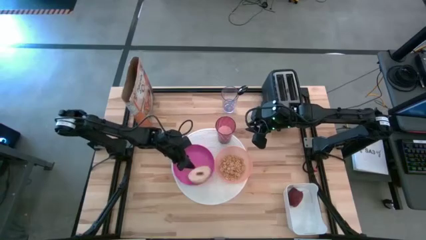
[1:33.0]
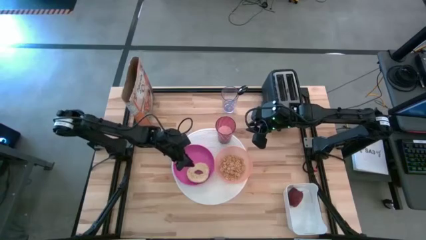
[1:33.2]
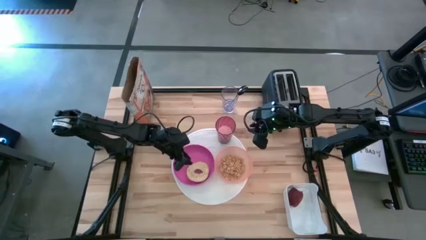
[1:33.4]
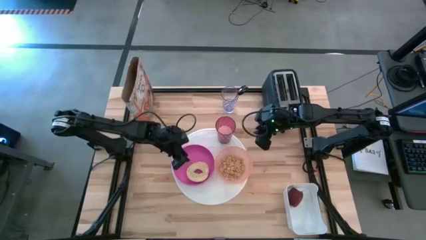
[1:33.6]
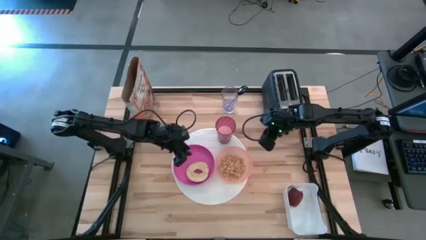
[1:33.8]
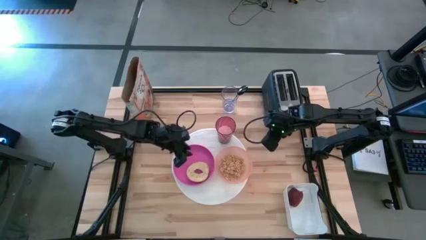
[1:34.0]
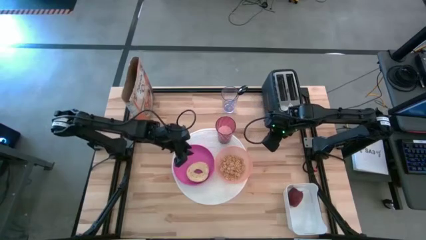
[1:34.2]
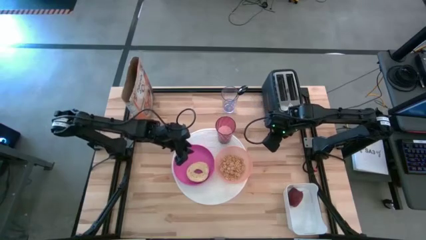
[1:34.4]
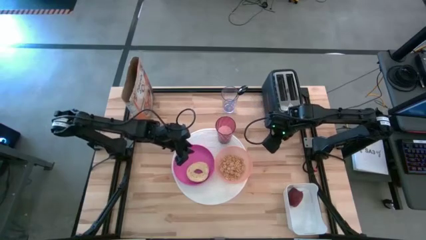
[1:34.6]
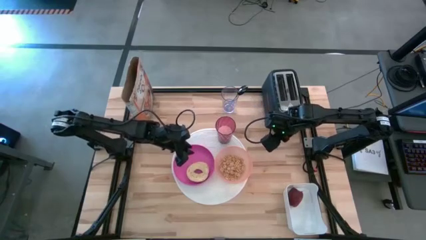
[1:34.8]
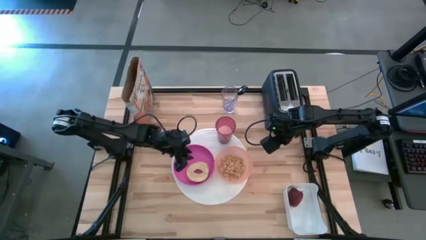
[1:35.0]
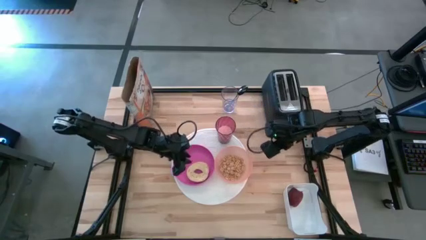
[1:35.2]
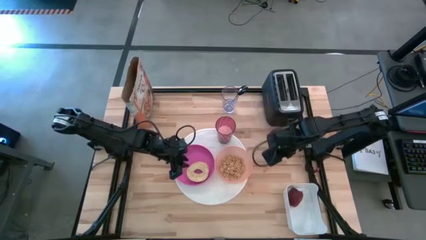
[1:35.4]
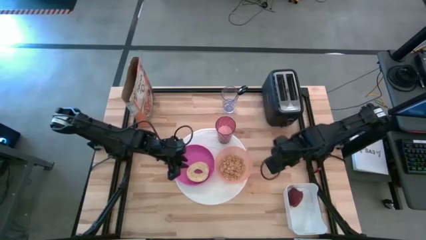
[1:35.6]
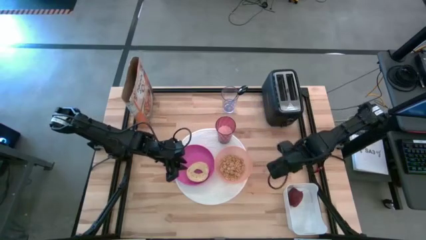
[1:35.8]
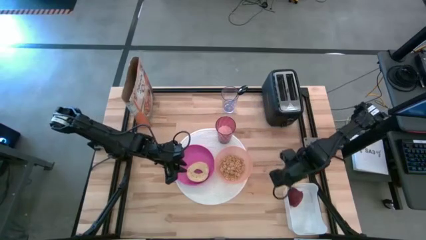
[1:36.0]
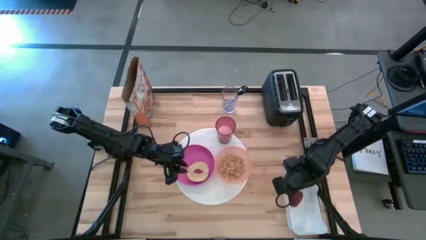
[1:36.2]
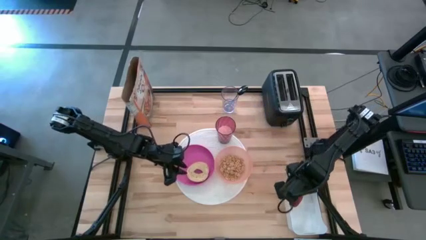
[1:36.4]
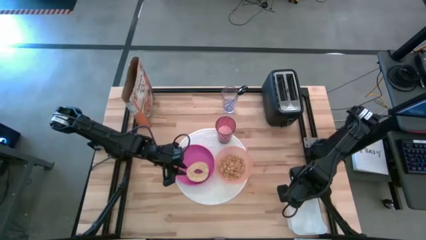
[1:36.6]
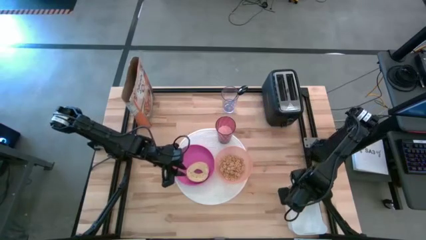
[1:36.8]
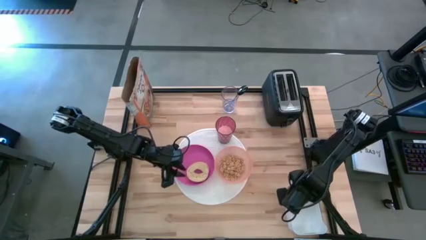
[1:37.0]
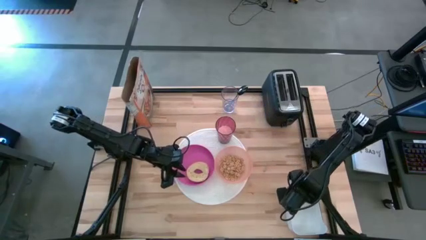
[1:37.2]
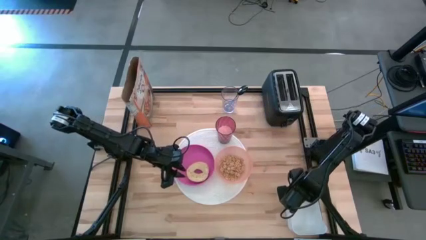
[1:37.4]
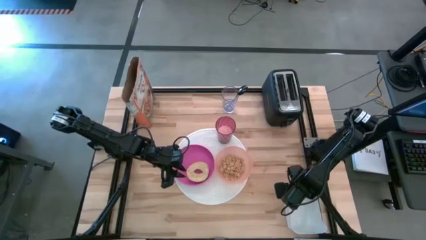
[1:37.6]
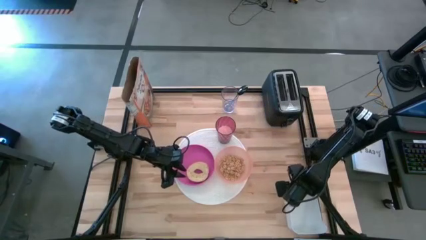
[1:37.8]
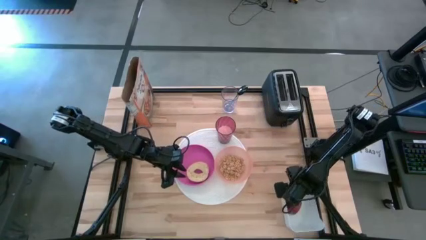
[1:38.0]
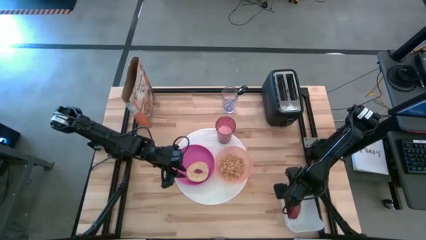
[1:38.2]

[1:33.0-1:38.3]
Task: Arrange a breakfast setting
Put the apple from the white bin to the top of the pink plate on the white mat

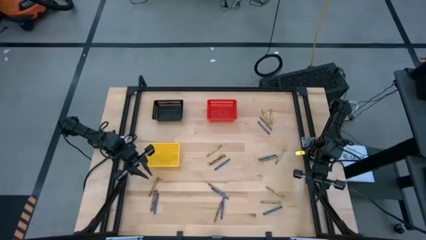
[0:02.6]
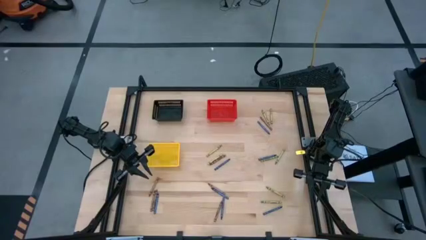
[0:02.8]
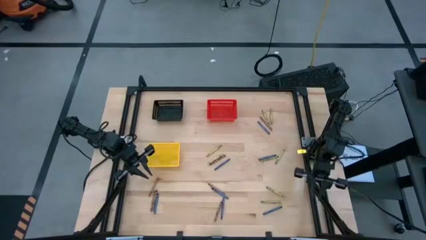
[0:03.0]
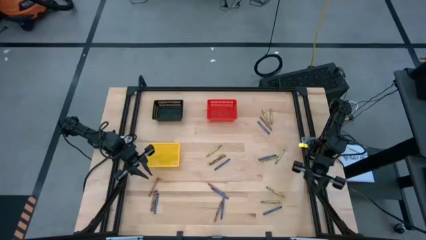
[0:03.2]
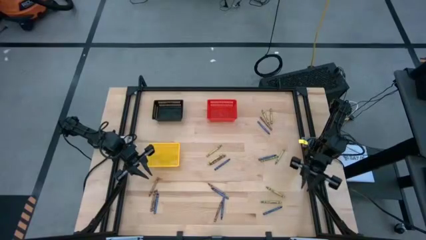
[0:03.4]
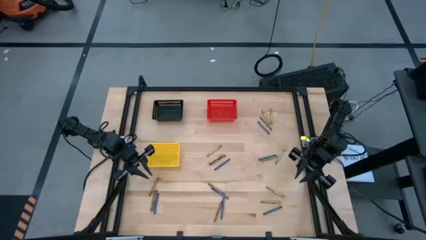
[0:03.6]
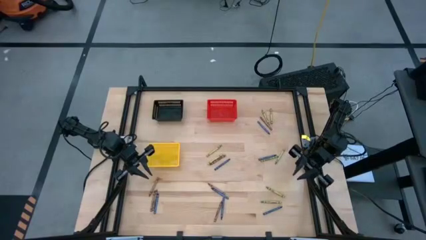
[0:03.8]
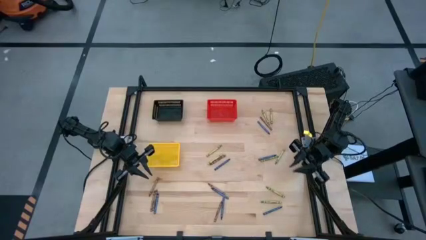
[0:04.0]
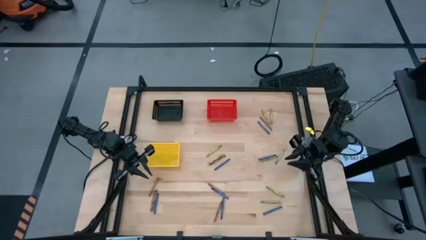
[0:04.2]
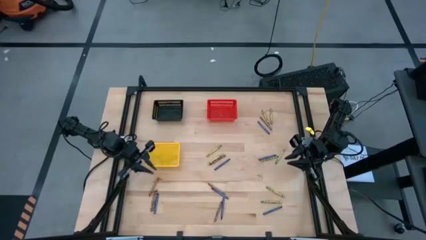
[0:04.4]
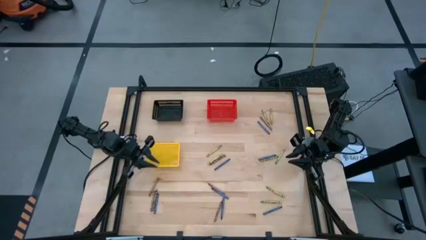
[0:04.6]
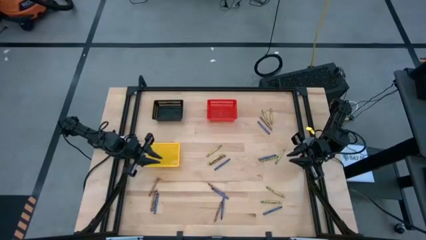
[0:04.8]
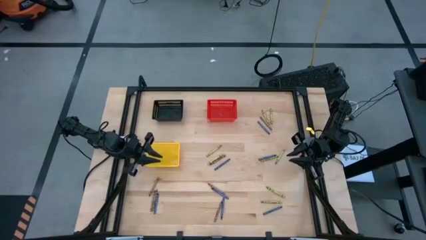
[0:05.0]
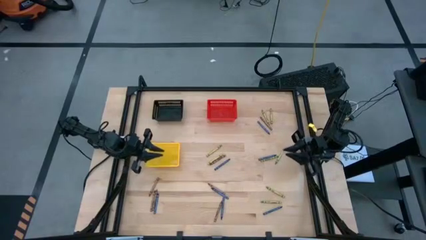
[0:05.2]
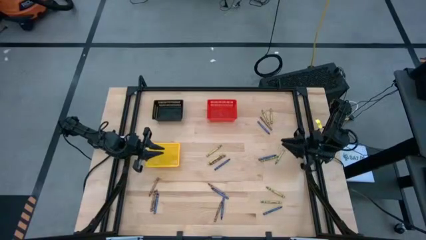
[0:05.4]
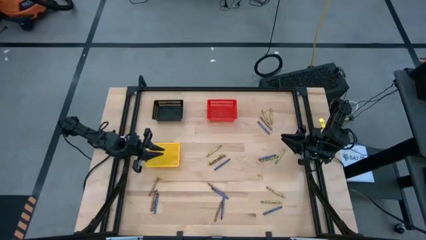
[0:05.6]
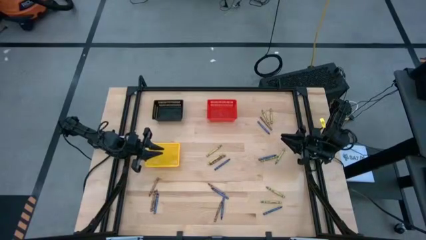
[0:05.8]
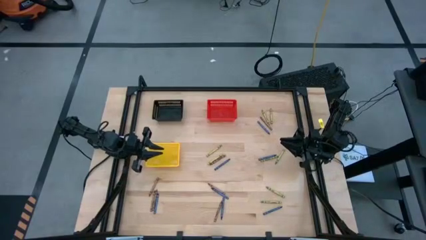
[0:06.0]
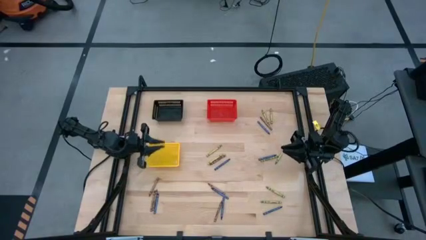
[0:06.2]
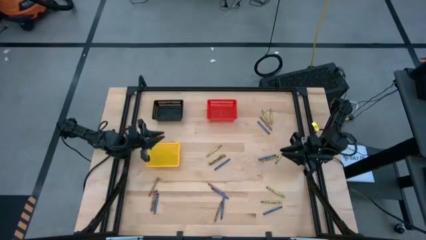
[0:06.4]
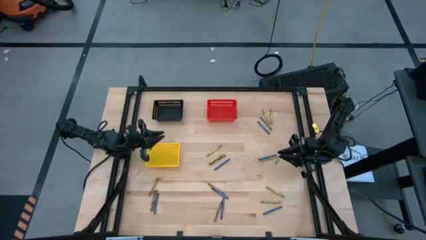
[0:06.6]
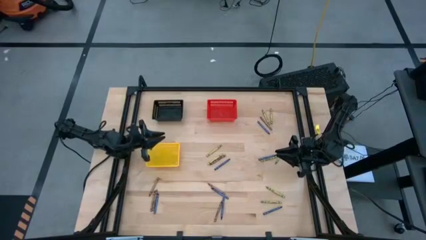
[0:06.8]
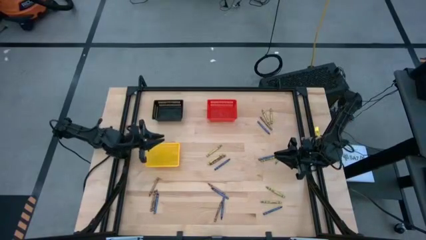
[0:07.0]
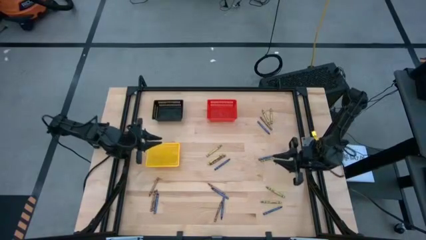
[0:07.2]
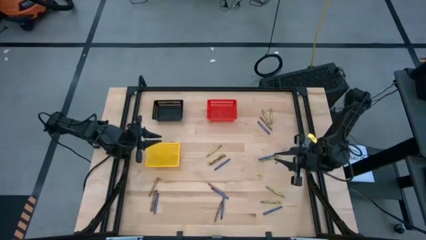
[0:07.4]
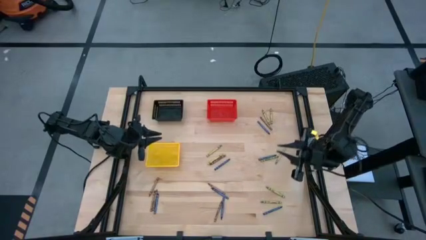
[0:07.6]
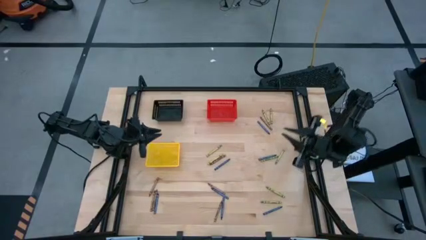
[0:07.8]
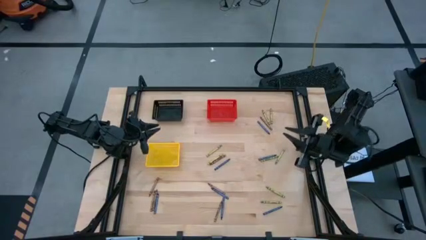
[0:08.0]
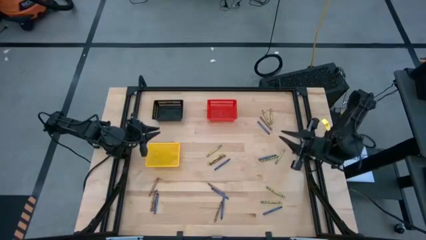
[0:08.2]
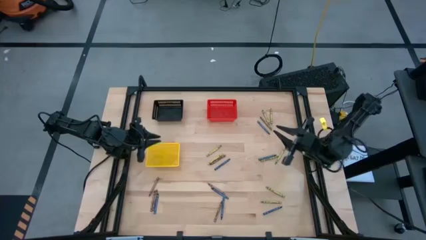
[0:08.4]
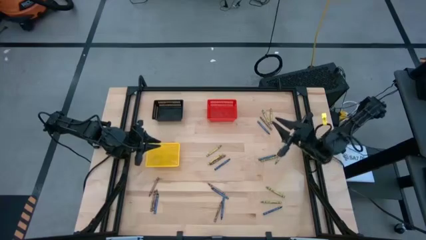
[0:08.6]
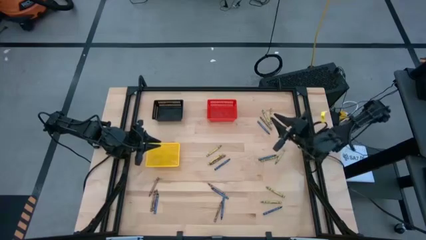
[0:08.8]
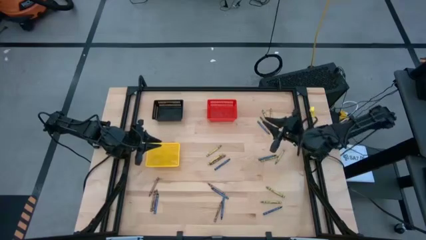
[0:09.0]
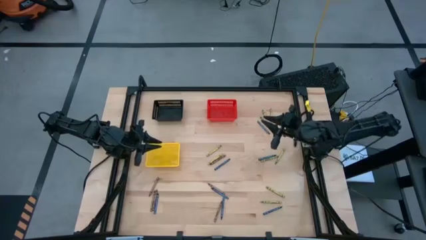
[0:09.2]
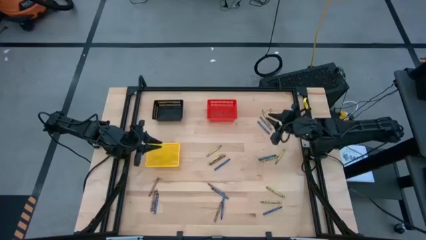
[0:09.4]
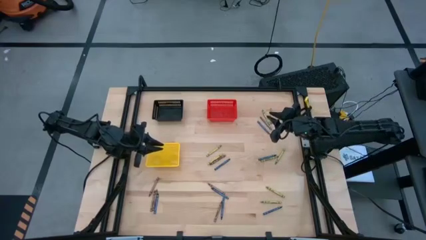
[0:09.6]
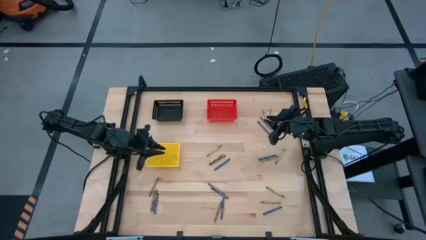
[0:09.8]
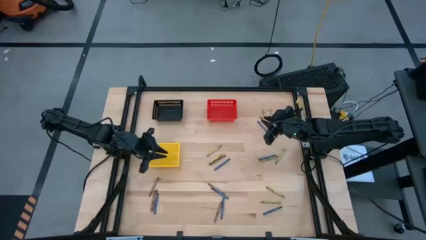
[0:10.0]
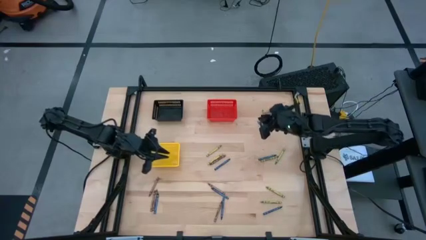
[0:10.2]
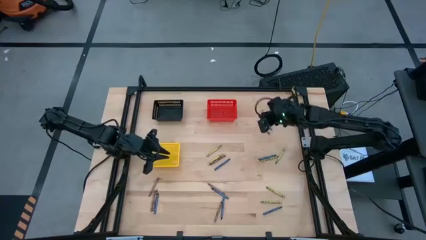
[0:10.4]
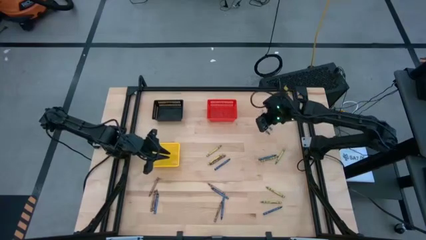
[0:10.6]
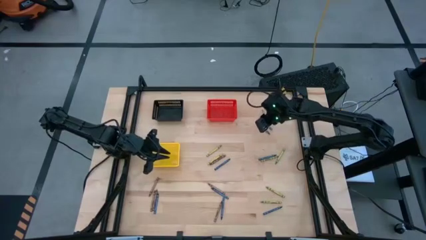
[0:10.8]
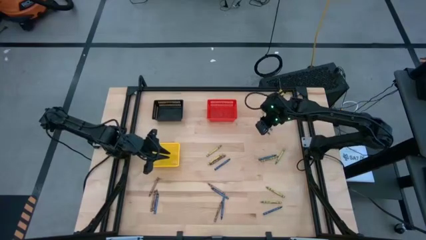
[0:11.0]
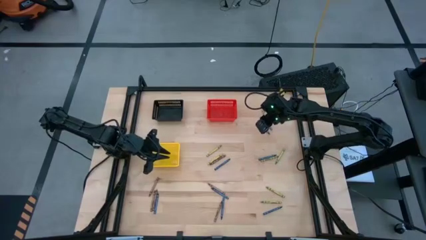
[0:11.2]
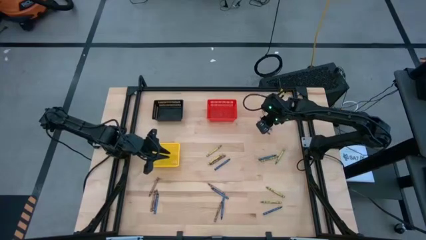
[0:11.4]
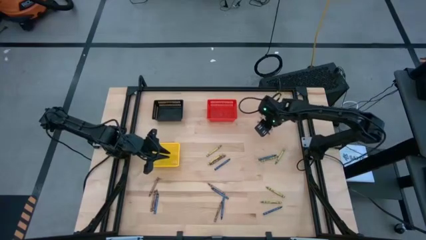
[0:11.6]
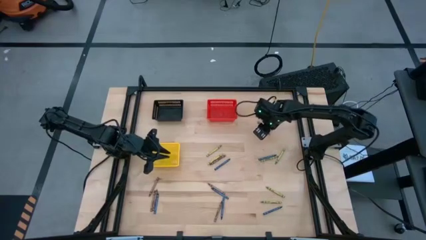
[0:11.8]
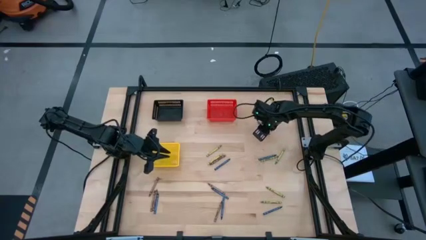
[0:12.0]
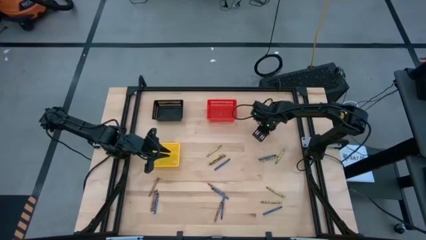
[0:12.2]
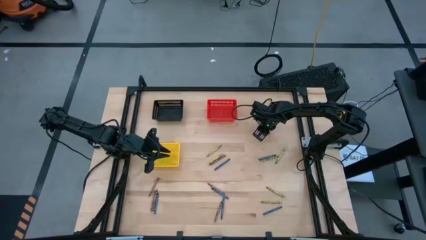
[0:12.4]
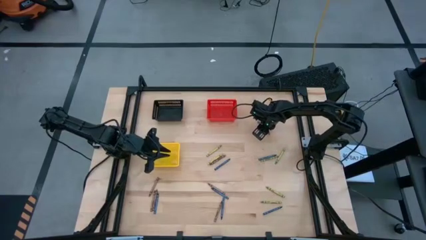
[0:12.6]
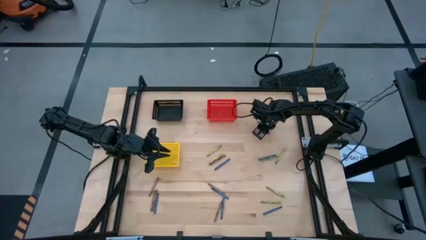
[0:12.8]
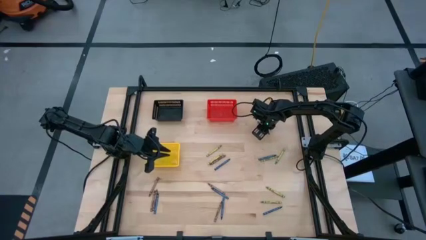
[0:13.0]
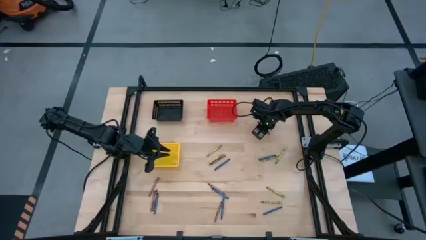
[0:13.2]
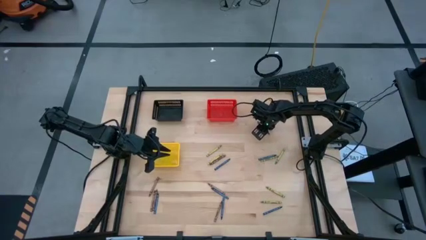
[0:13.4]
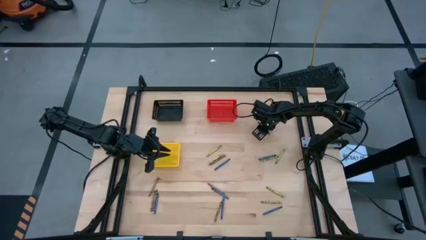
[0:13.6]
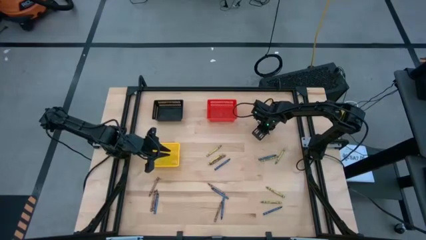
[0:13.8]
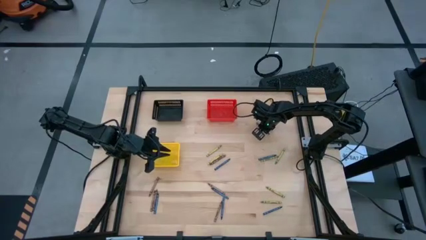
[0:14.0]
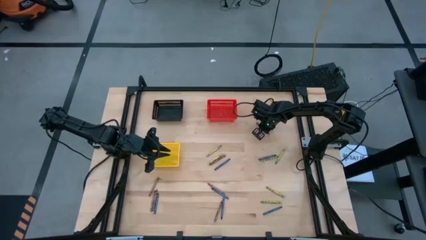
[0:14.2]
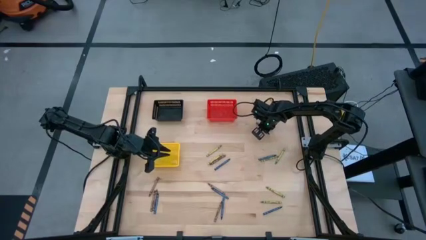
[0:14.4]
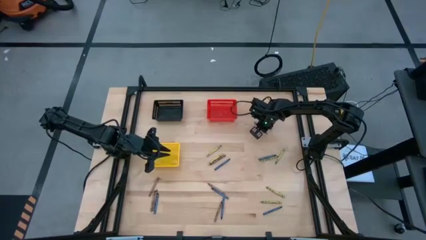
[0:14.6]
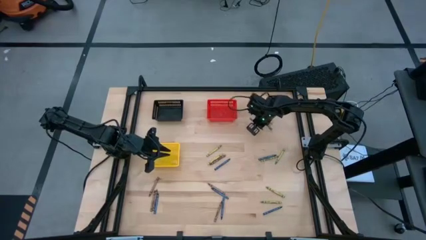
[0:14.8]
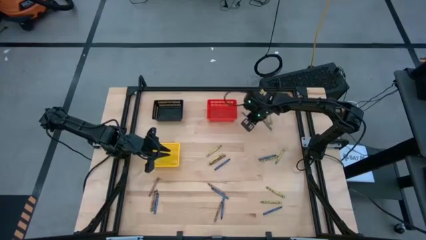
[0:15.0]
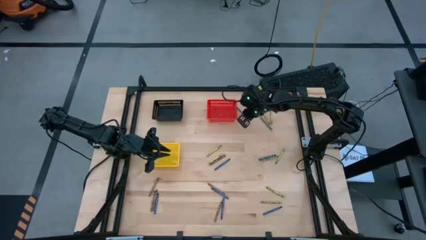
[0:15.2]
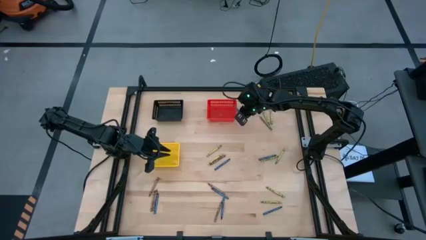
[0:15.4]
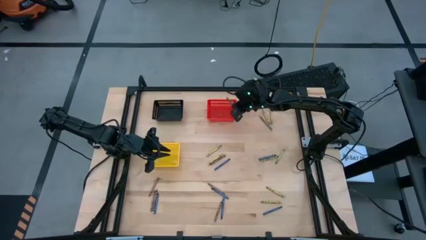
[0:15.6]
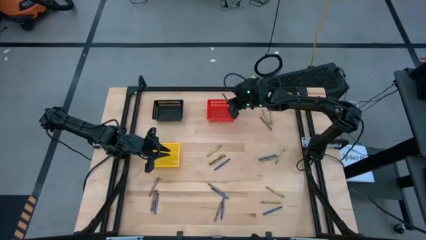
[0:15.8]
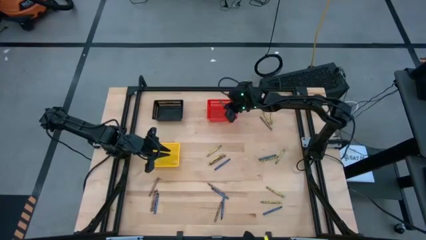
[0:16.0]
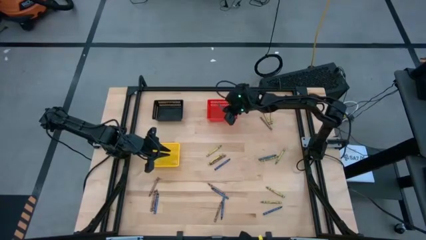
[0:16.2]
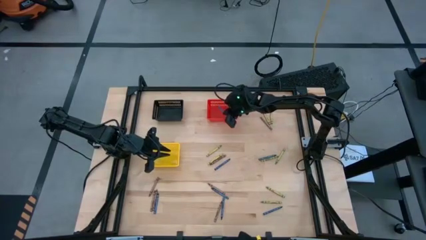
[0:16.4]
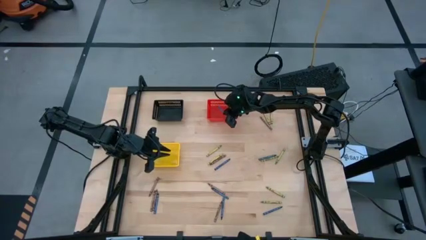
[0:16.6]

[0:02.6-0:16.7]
Task: Sort crayons
Put the blue crayon into the red basket
